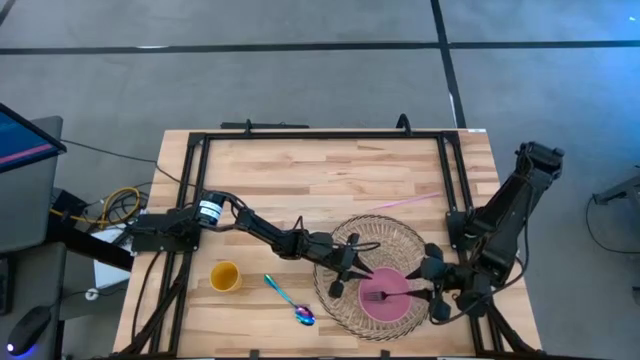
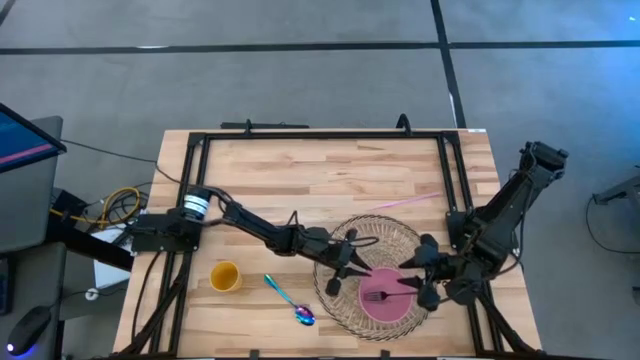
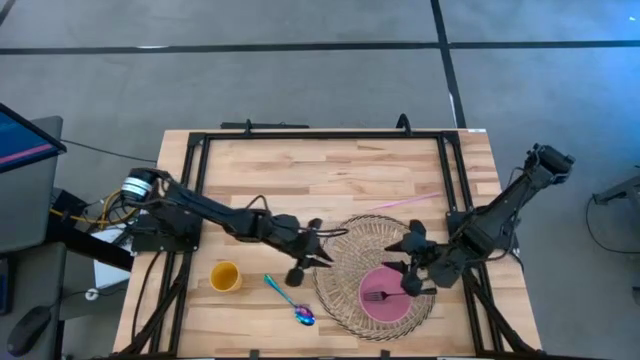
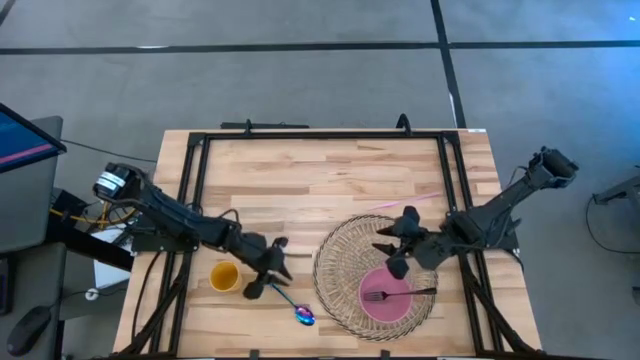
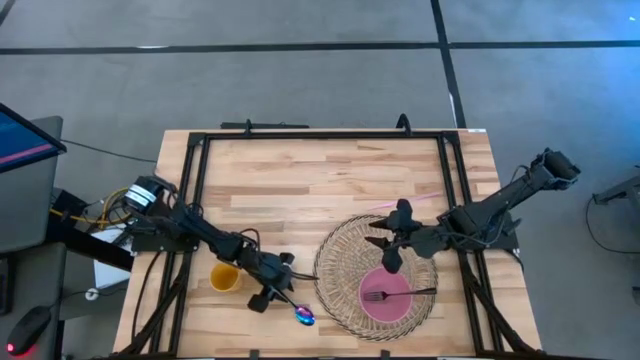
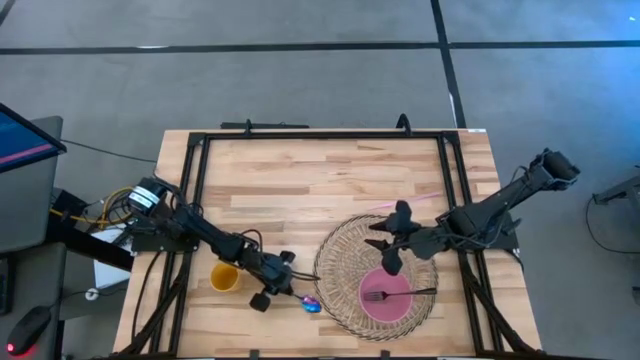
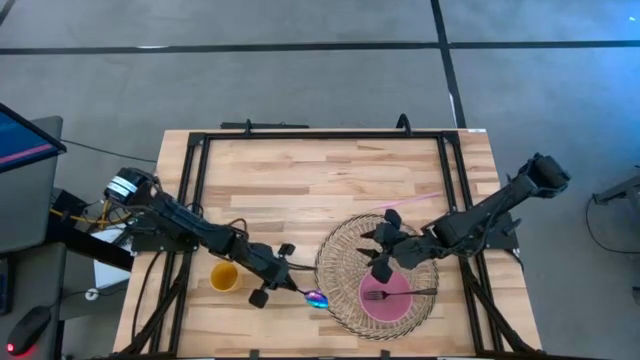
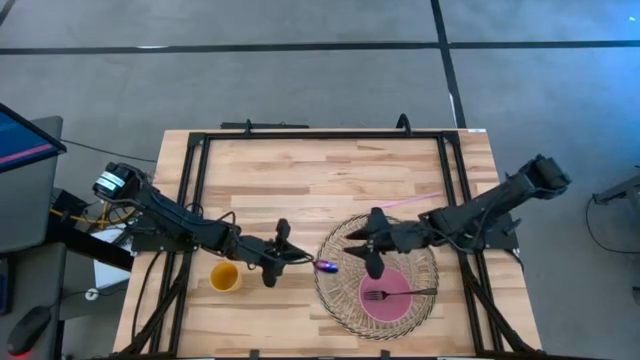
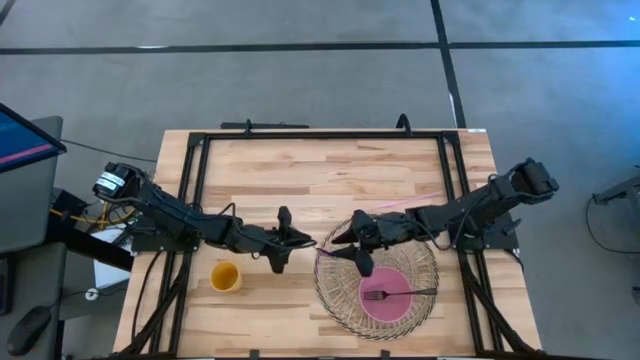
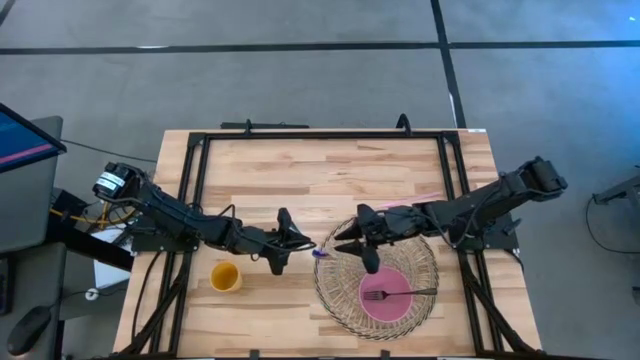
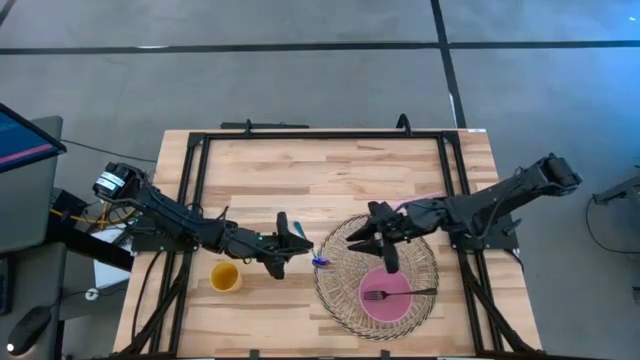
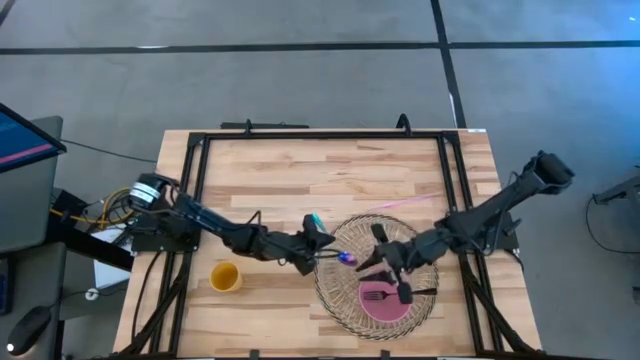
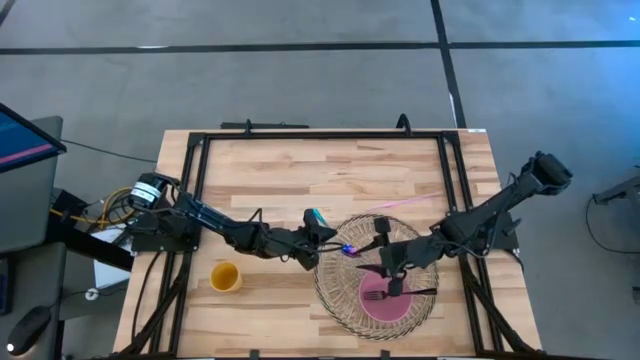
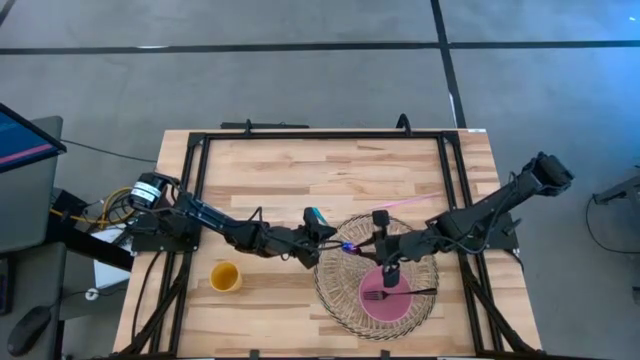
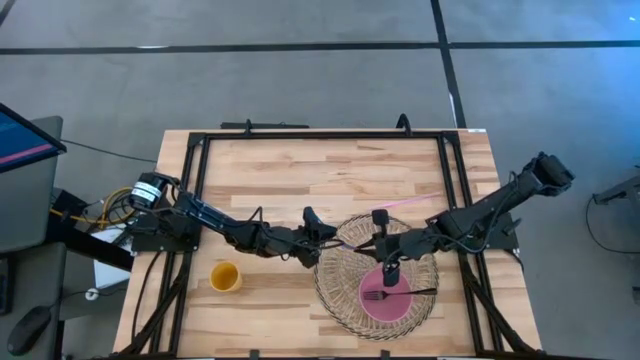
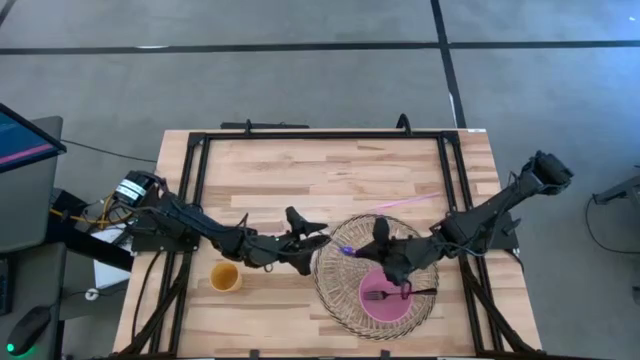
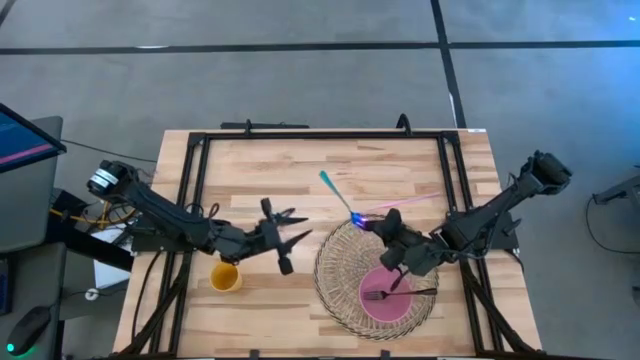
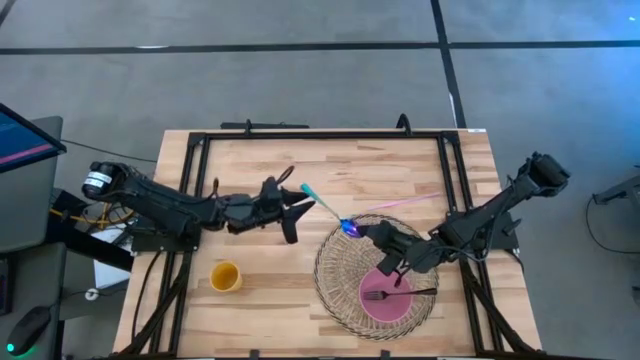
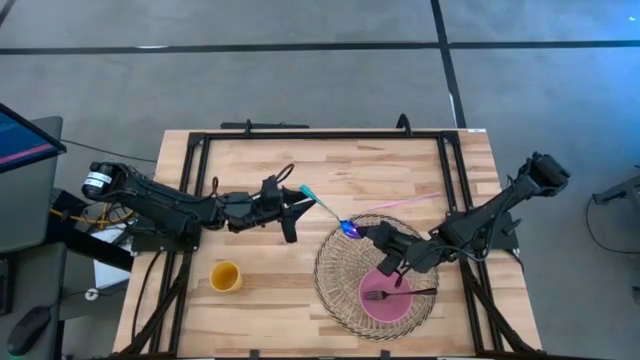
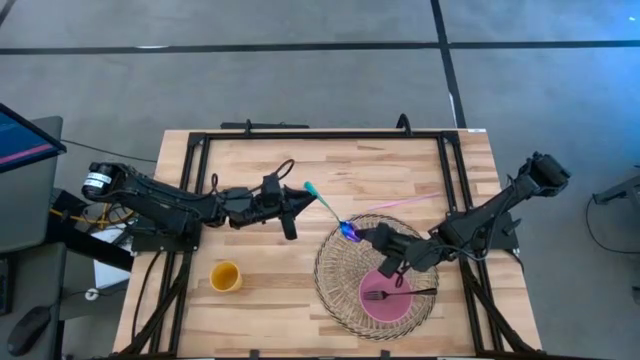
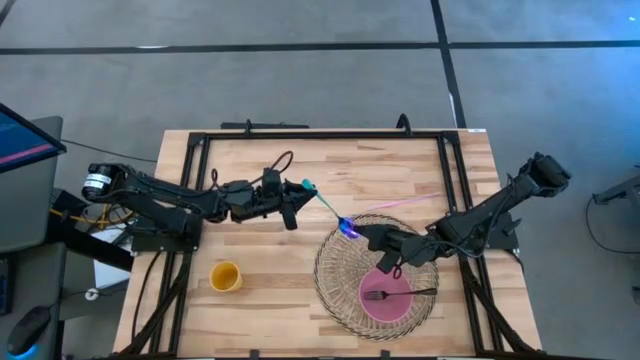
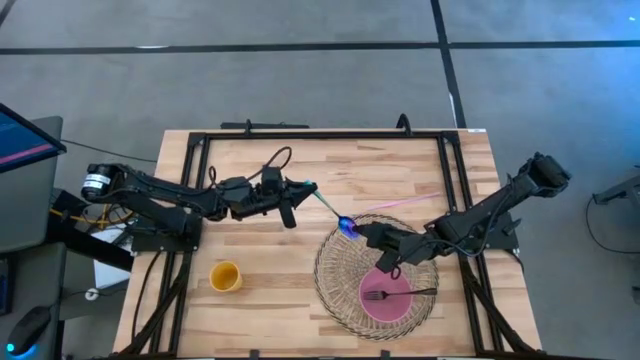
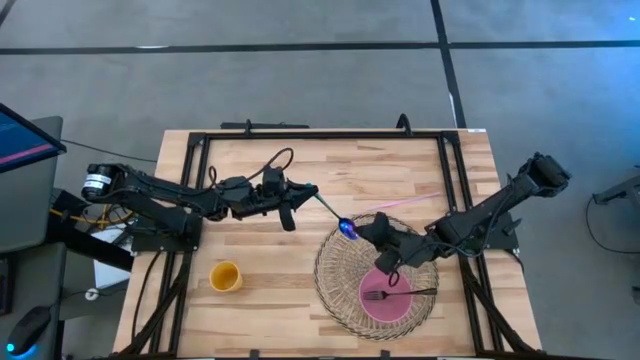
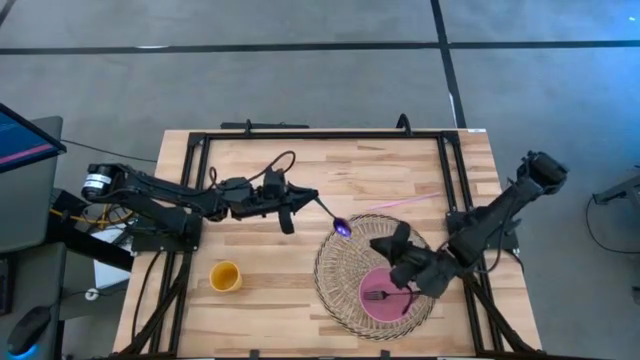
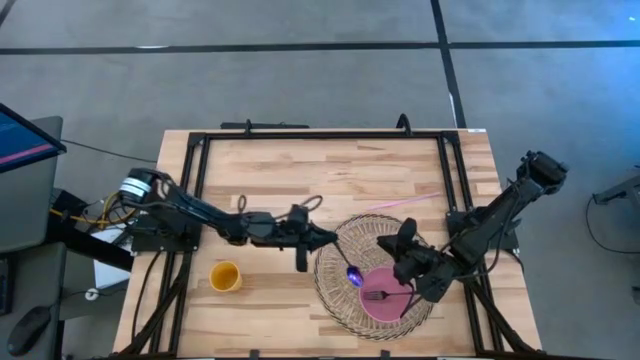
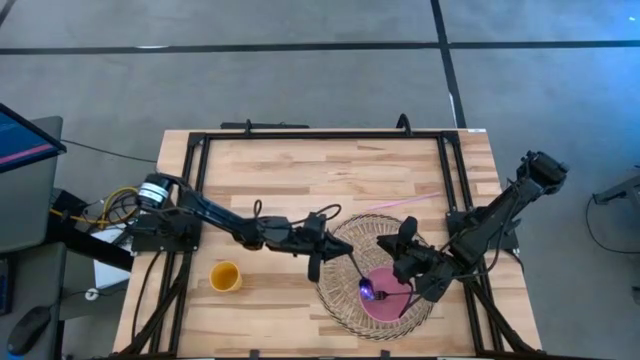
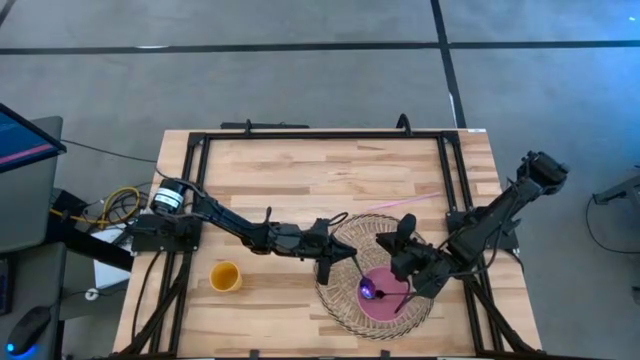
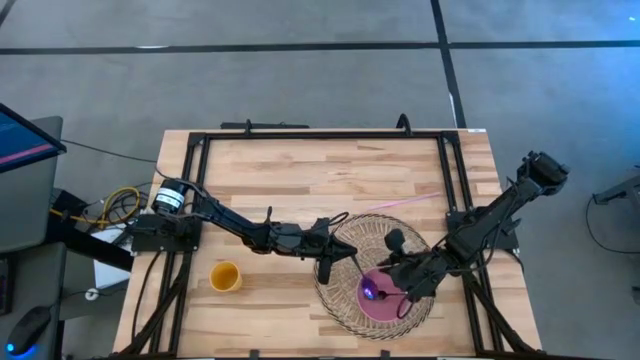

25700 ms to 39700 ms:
Task: Pick & Place Utensil
Put the blue spoon into the pink bowl on the brown mat

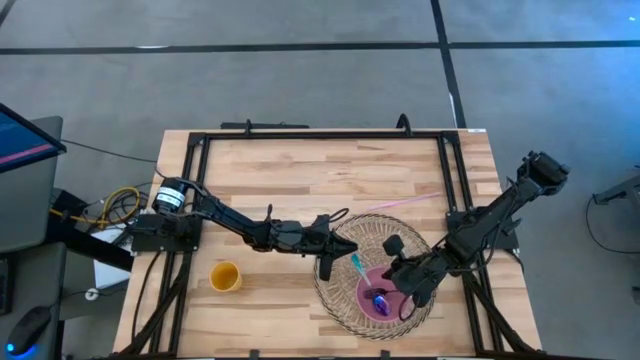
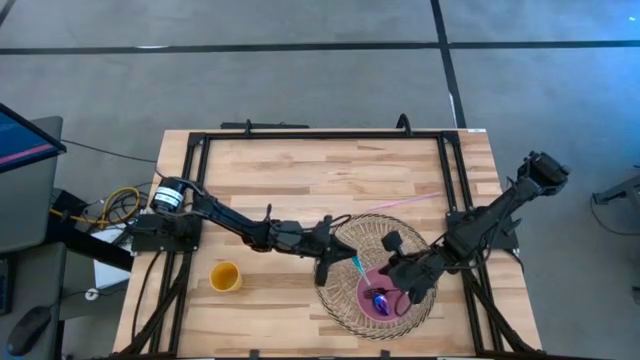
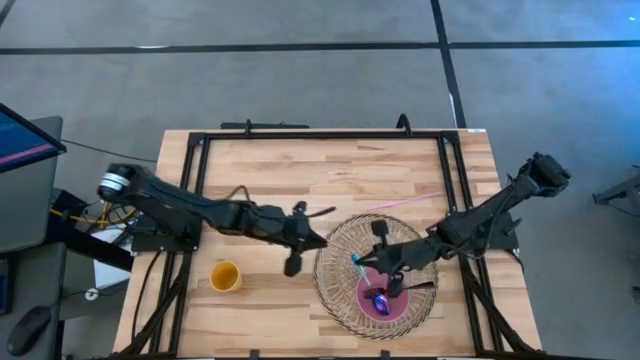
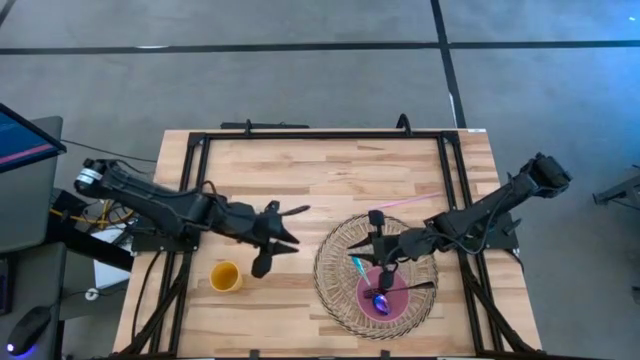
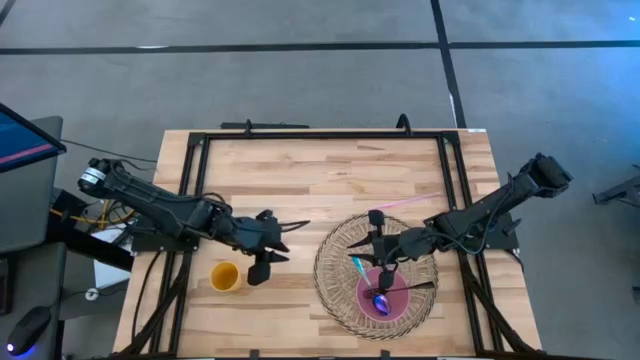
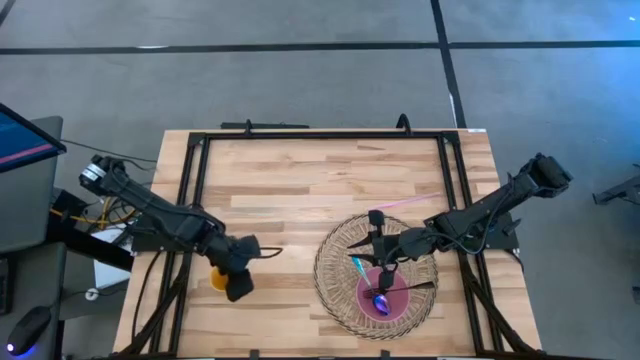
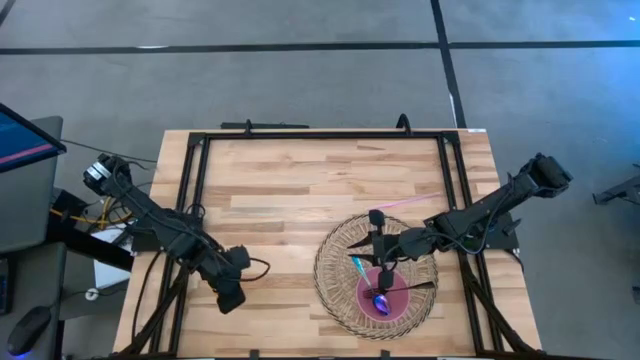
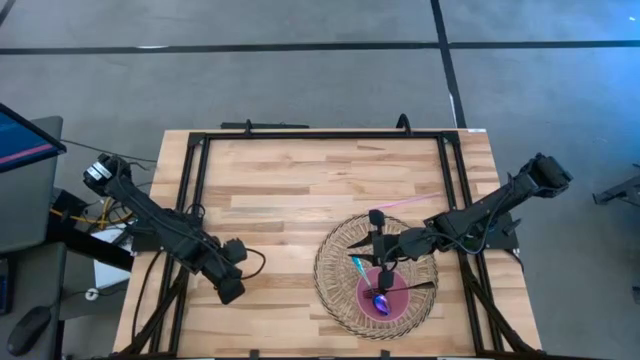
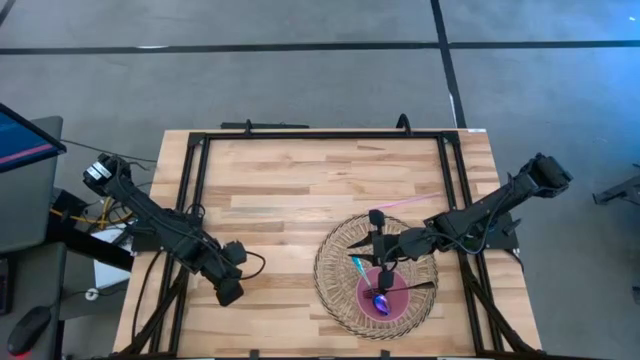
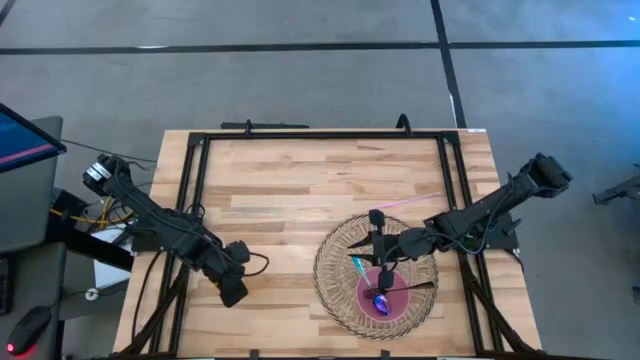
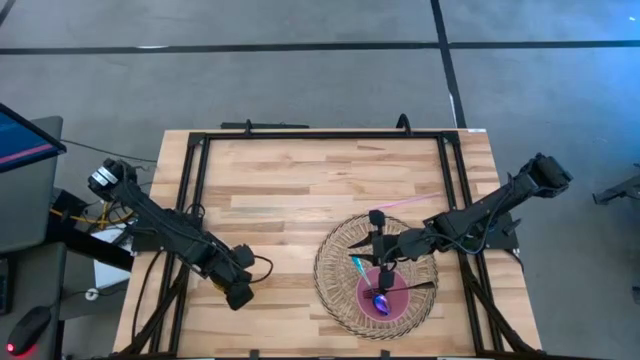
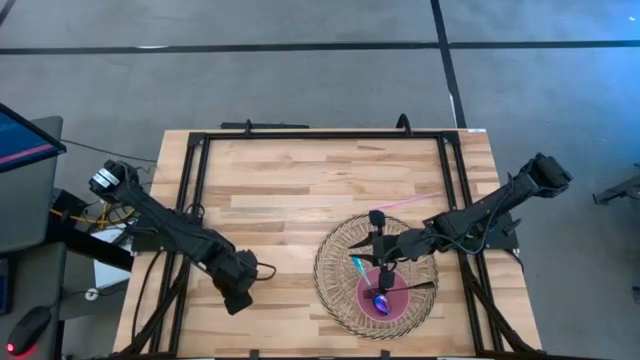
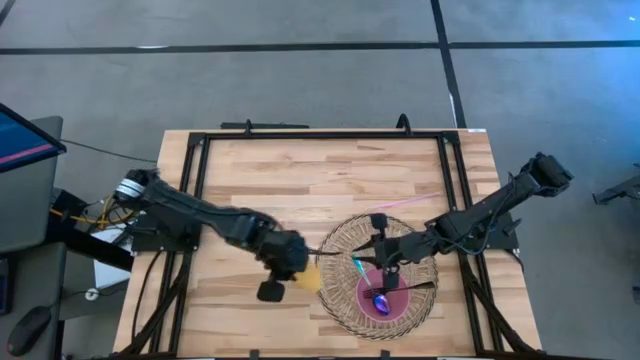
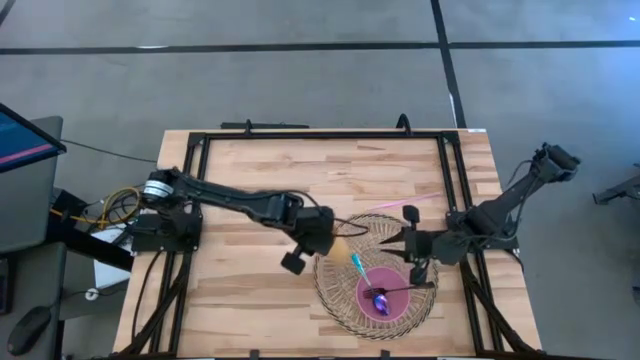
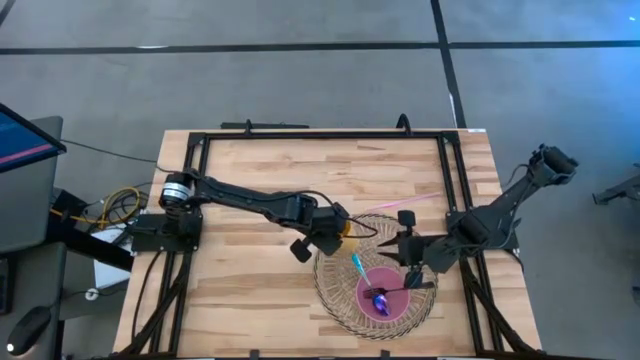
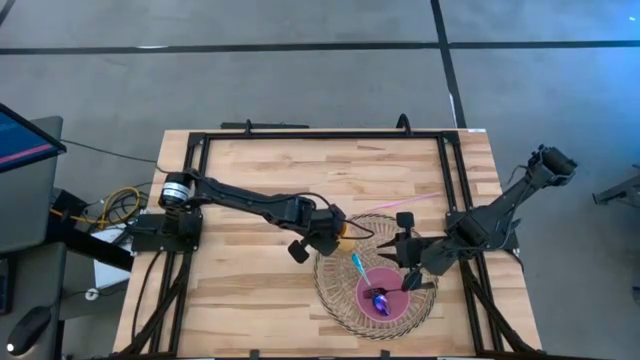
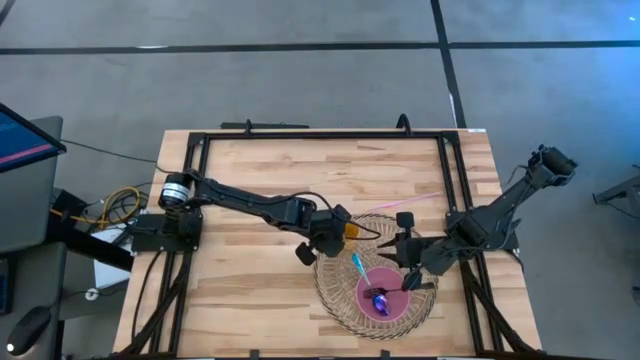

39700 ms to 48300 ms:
Put the yellow cup on the brown mat to the top left of the pink bowl
